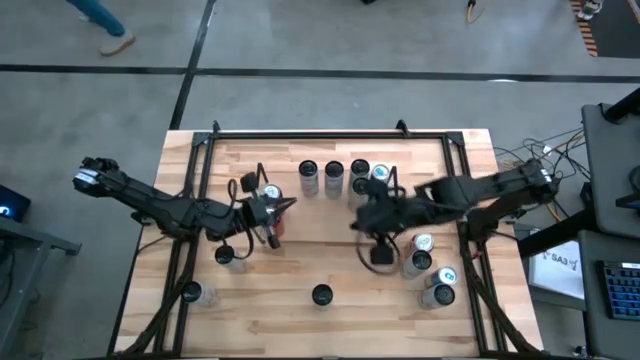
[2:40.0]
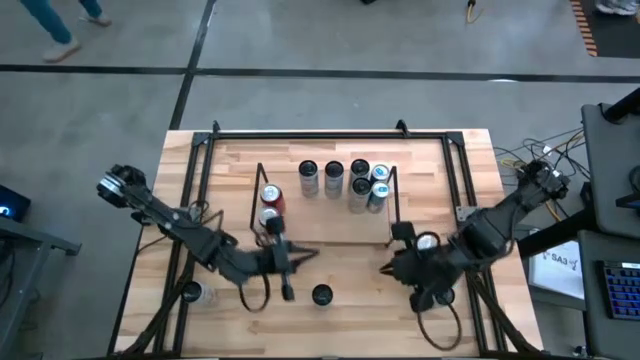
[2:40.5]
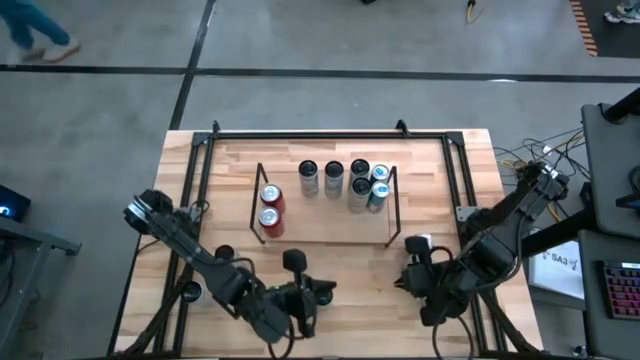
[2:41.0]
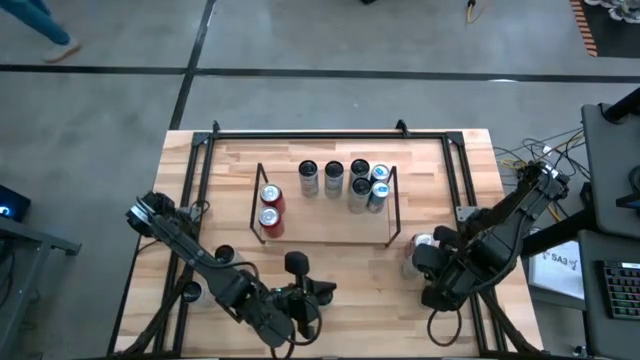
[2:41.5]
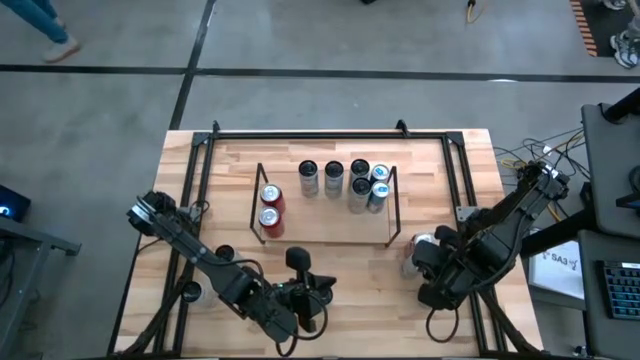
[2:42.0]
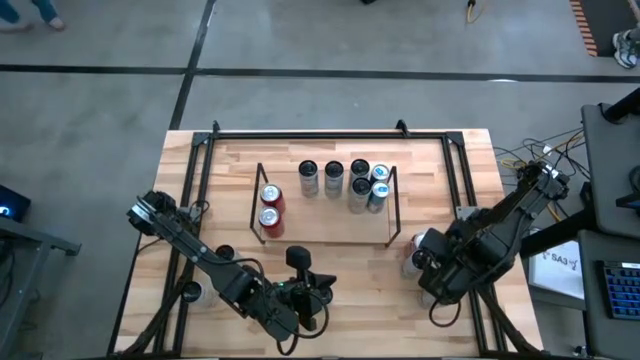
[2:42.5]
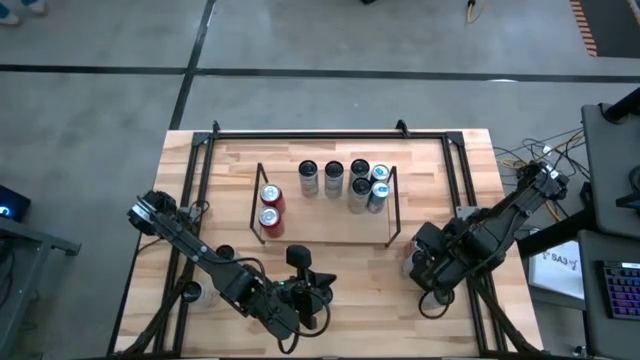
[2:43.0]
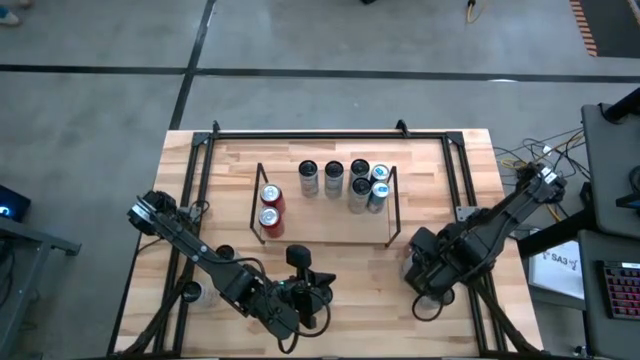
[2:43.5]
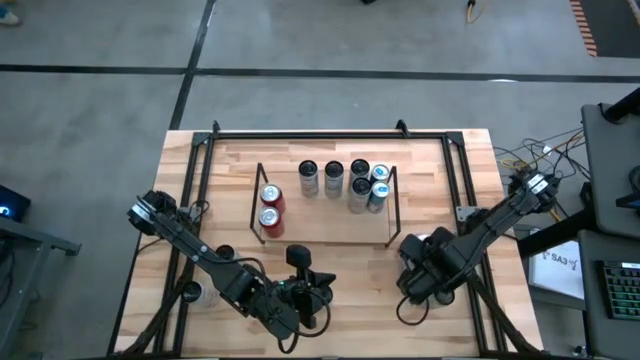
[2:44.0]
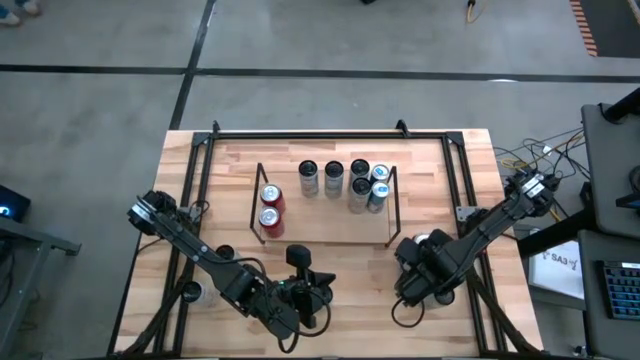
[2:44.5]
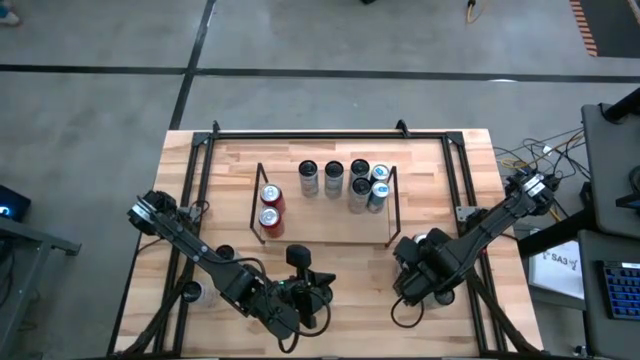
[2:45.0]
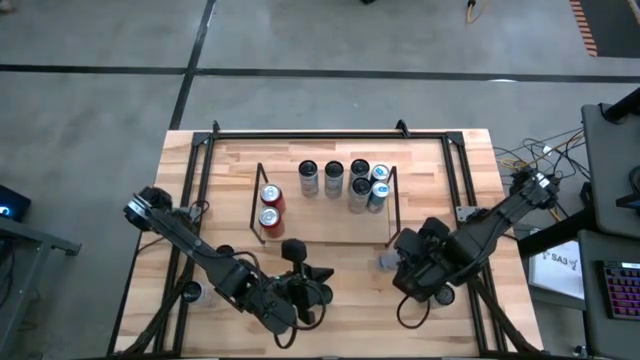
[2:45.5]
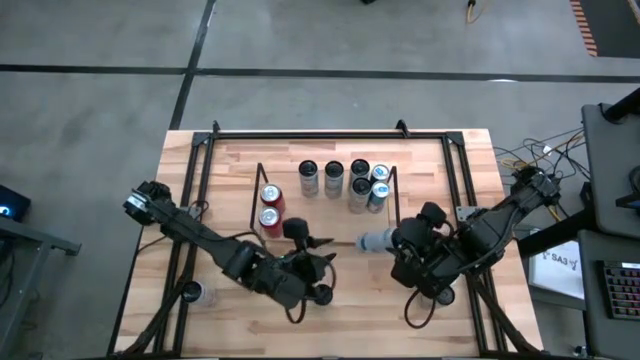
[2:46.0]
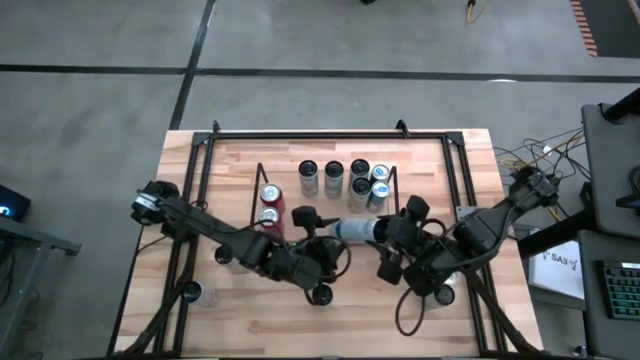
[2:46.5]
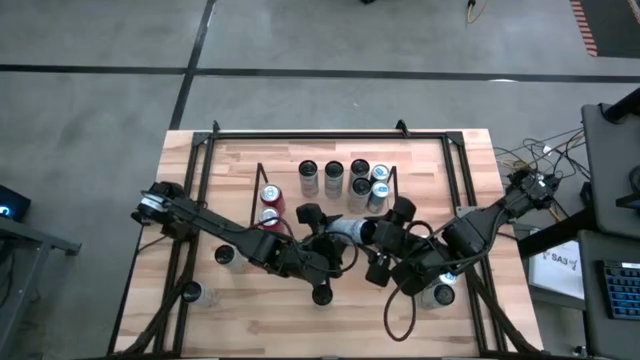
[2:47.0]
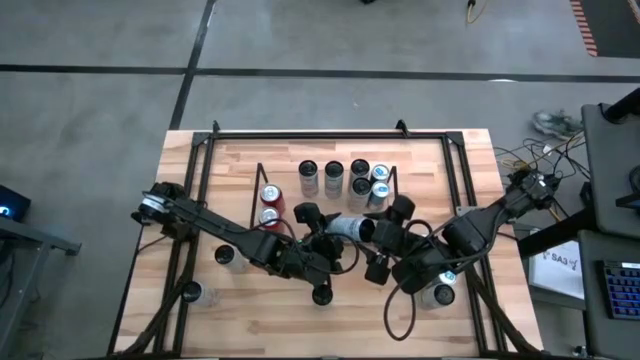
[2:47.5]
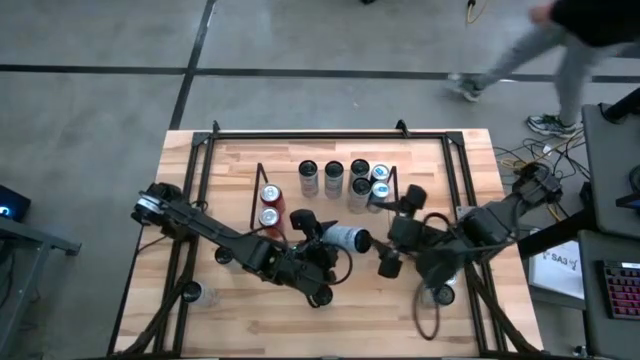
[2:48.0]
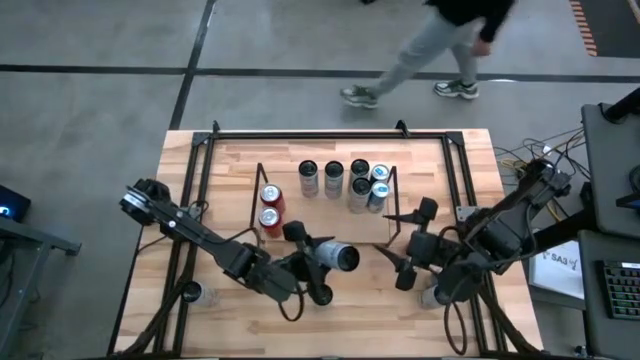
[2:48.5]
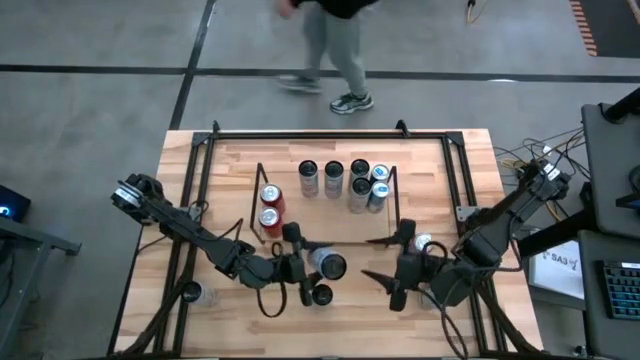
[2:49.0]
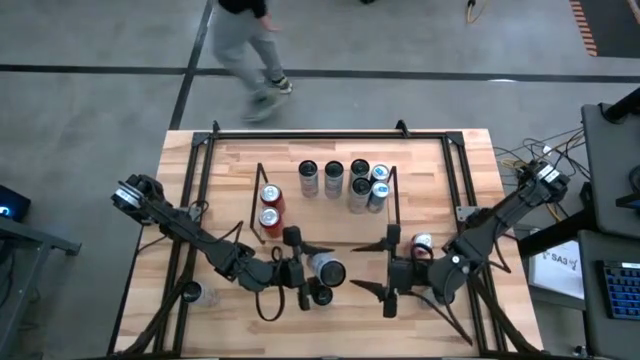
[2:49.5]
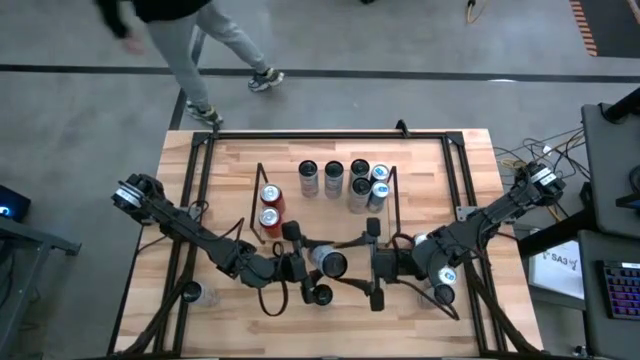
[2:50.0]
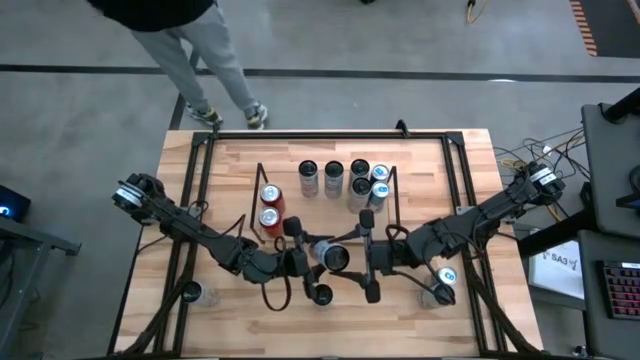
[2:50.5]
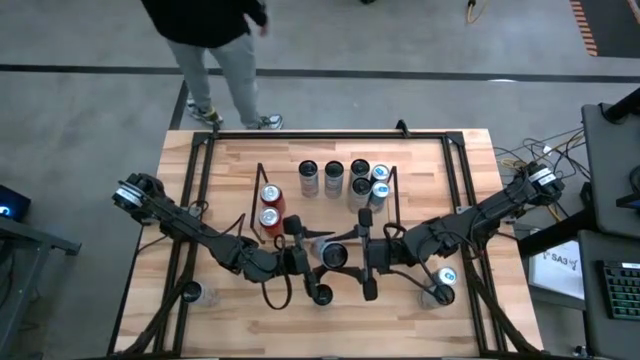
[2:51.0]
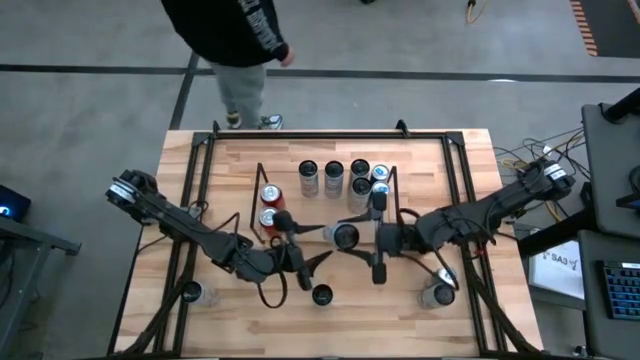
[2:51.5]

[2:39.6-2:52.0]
Task: Place canned beverage on shelf
Put the white and blue soda can on the shelf aligned with the other white and blue soda can

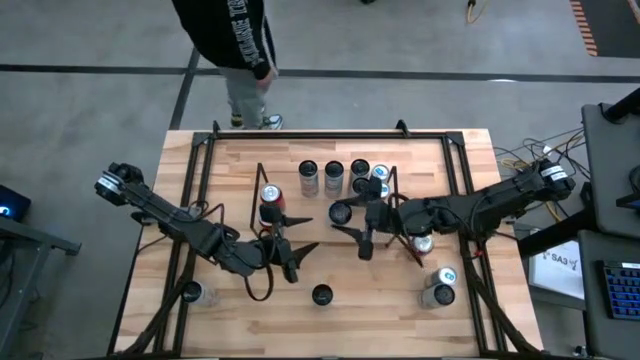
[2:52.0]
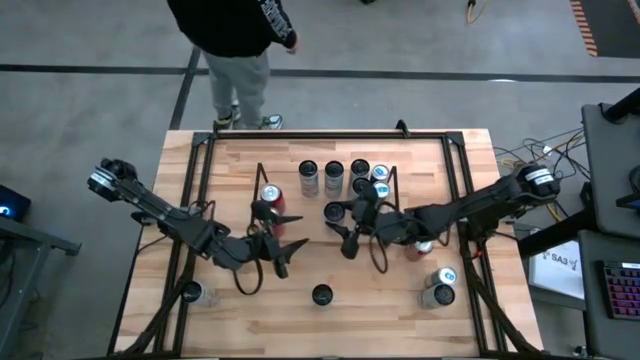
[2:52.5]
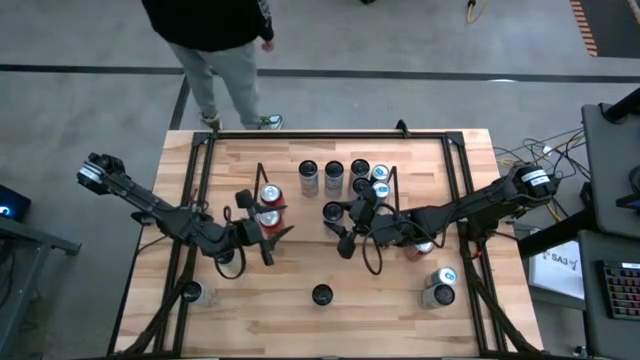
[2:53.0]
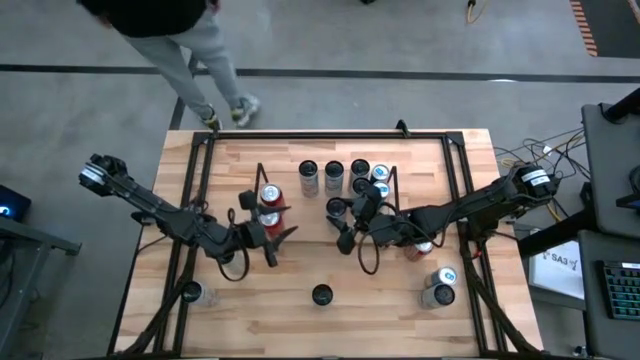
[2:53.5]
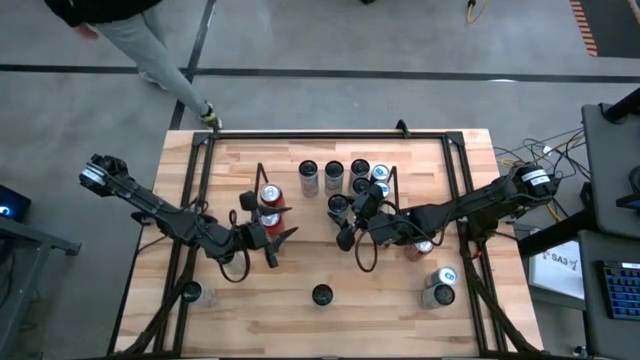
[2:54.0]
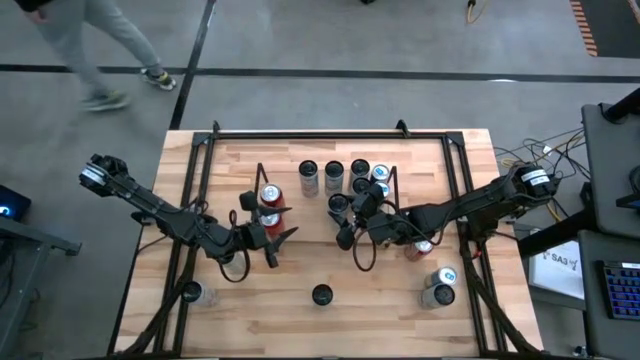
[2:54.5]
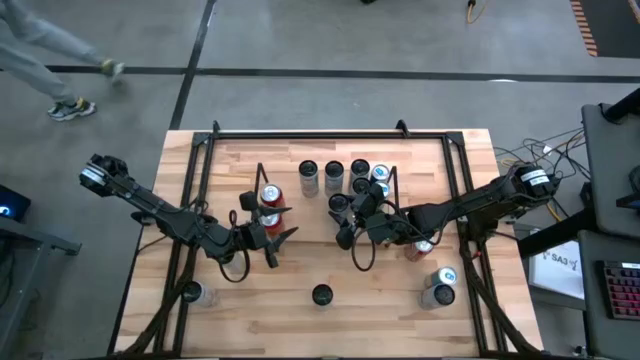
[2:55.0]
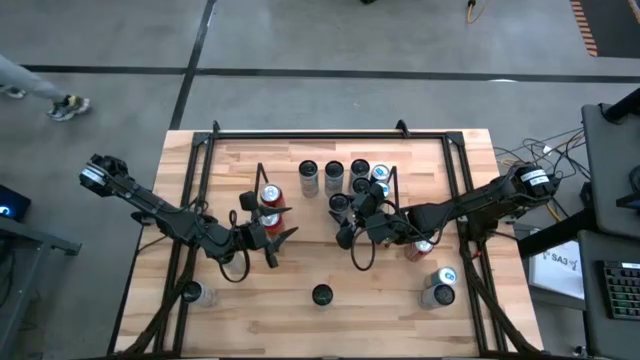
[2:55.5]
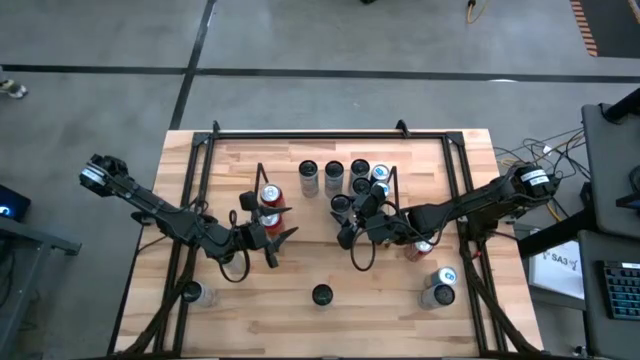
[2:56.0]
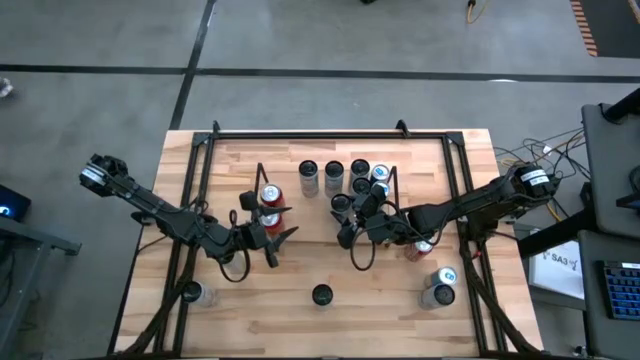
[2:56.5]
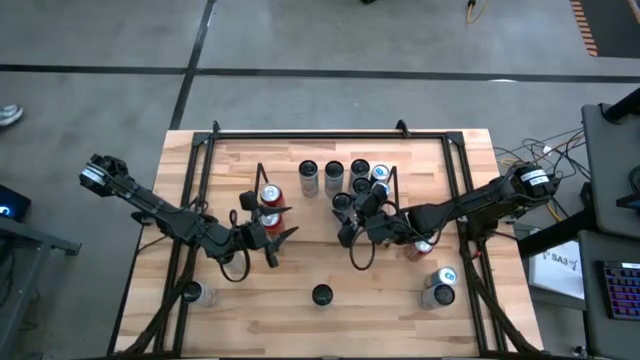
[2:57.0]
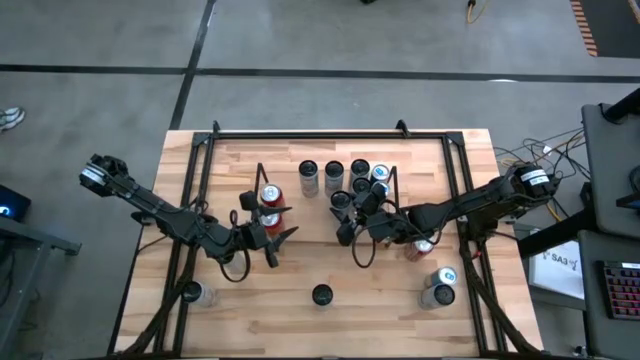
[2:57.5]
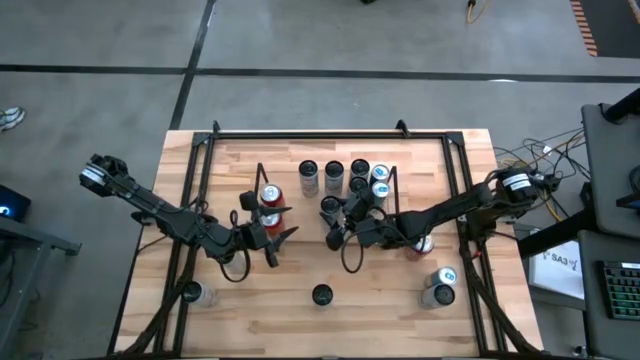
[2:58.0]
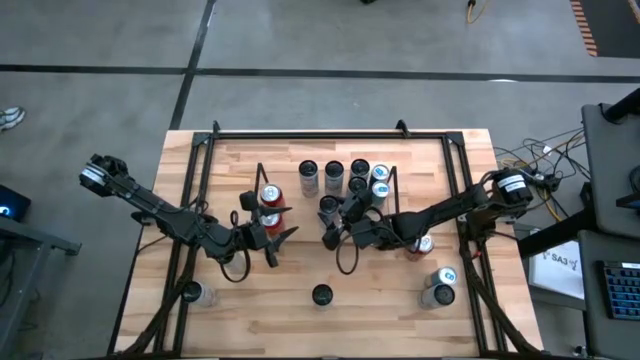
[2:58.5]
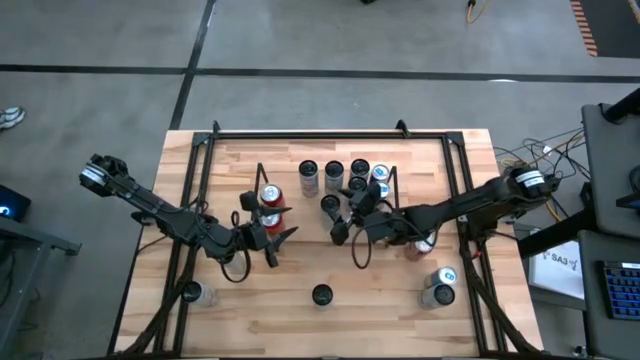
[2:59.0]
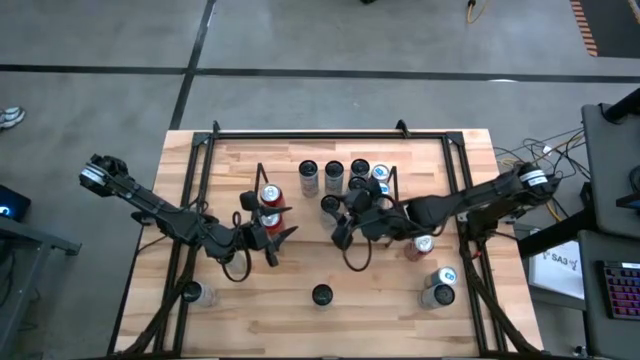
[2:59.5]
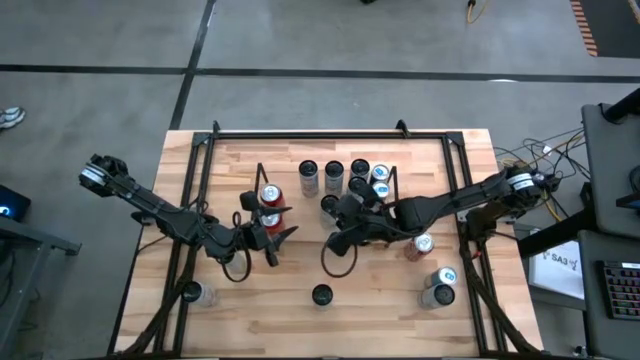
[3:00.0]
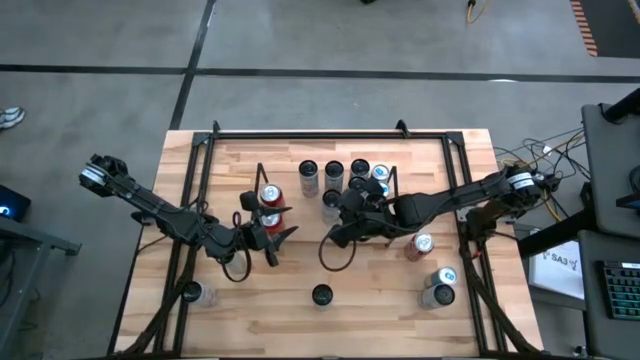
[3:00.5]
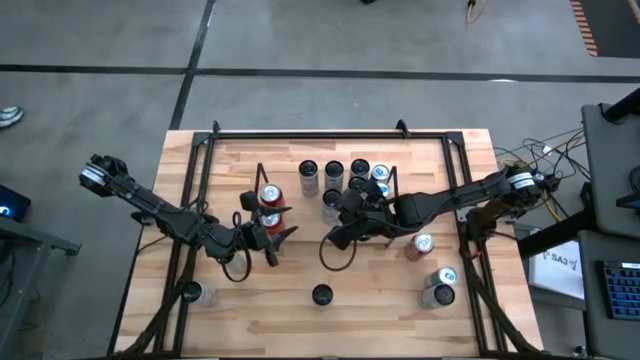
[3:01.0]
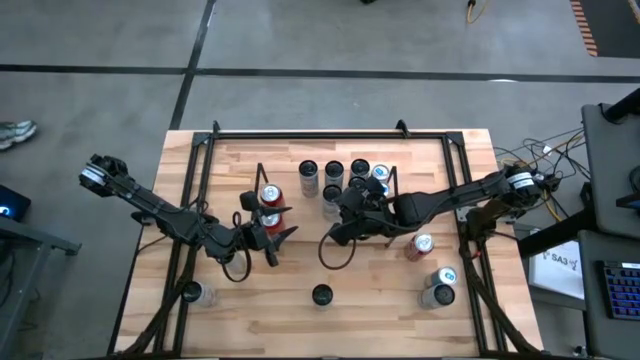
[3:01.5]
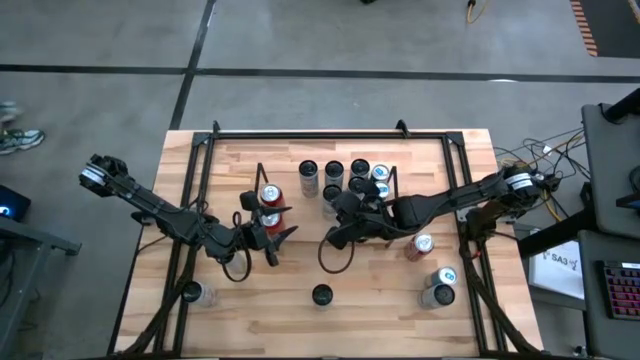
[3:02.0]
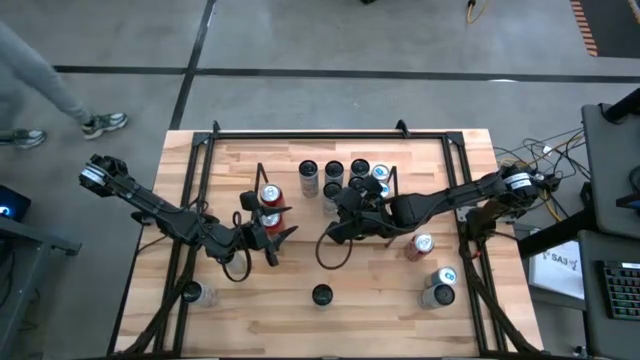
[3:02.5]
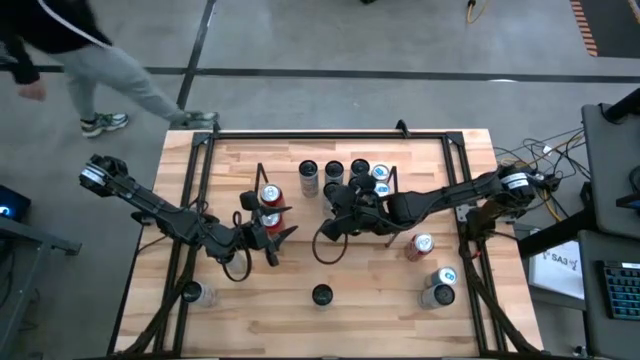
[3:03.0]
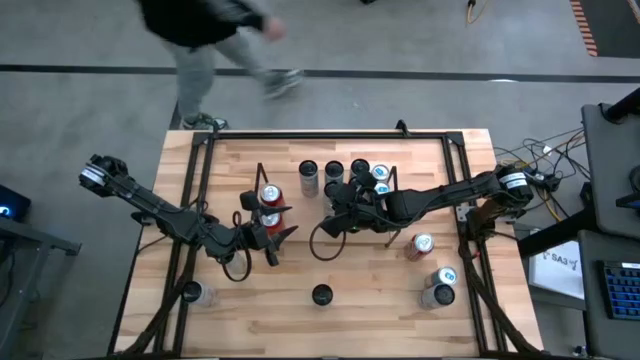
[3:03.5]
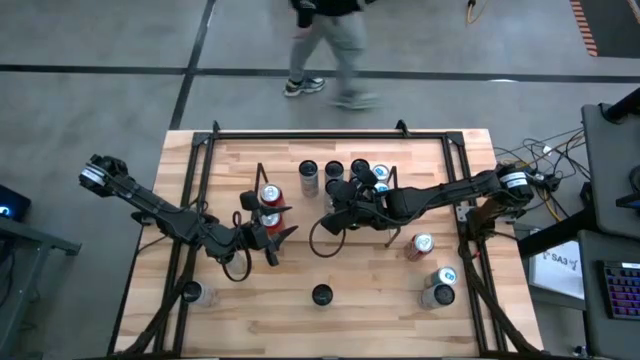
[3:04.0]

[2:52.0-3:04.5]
Put the white and blue soda can on the shelf aligned with the other white and blue soda can
